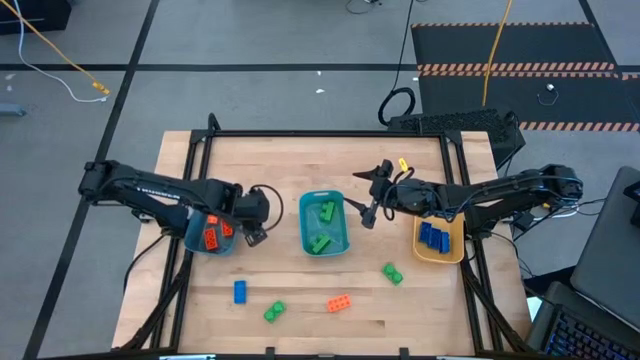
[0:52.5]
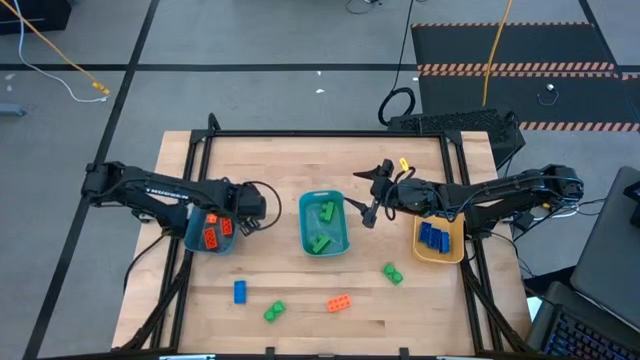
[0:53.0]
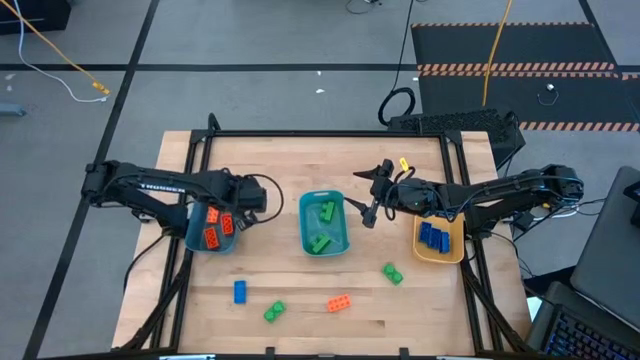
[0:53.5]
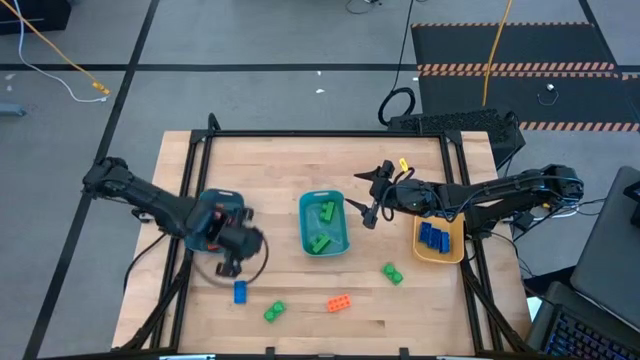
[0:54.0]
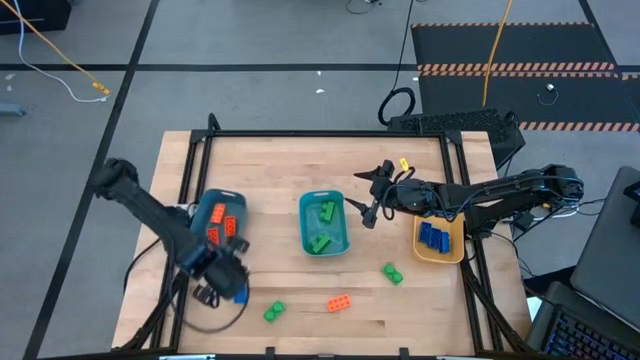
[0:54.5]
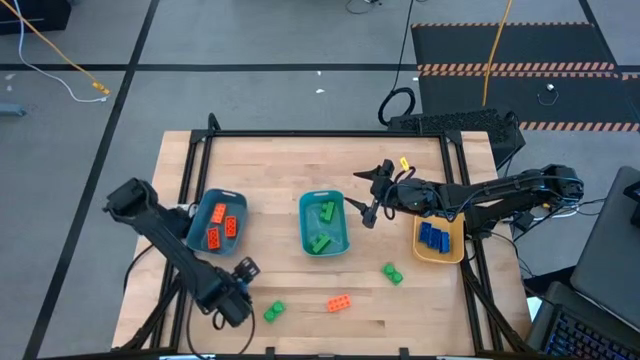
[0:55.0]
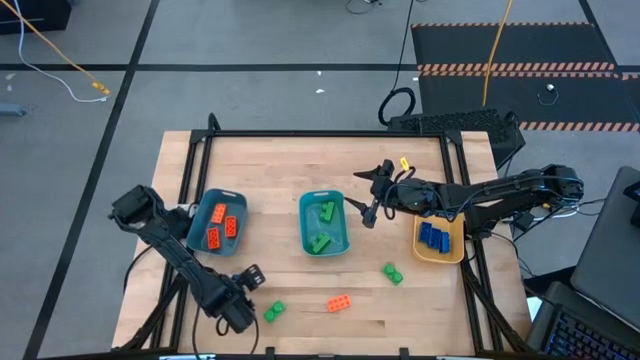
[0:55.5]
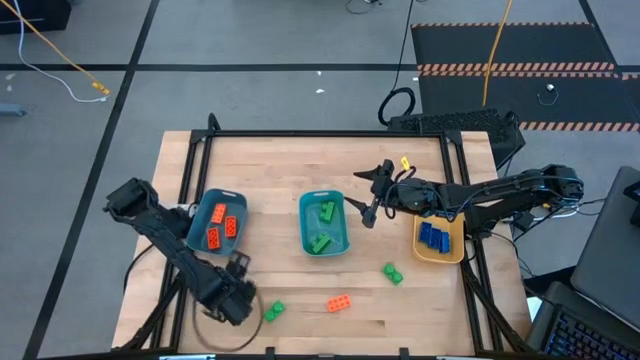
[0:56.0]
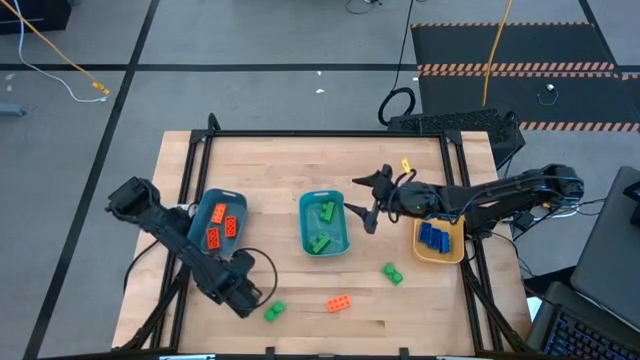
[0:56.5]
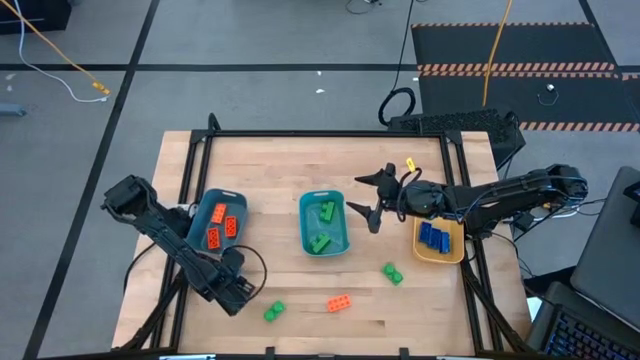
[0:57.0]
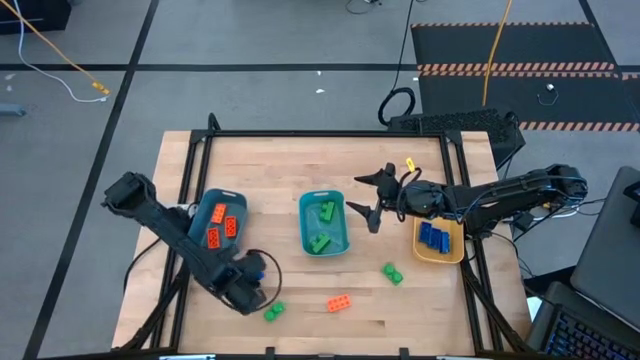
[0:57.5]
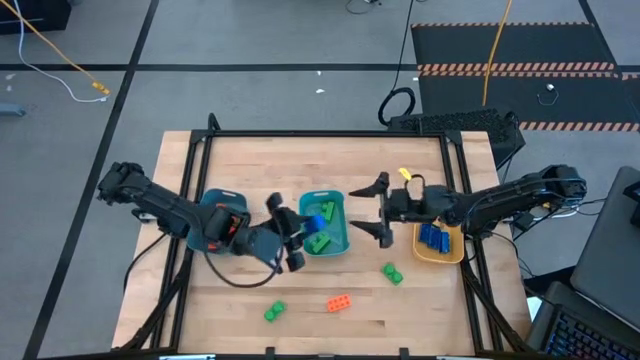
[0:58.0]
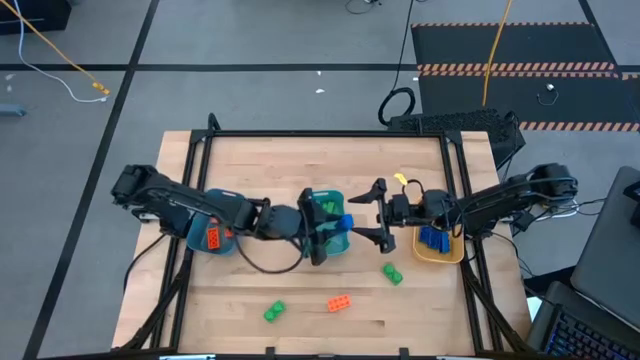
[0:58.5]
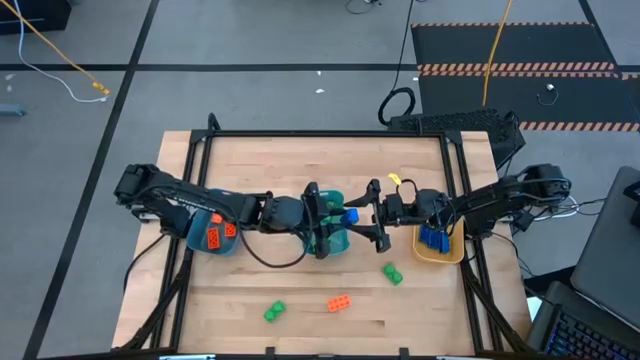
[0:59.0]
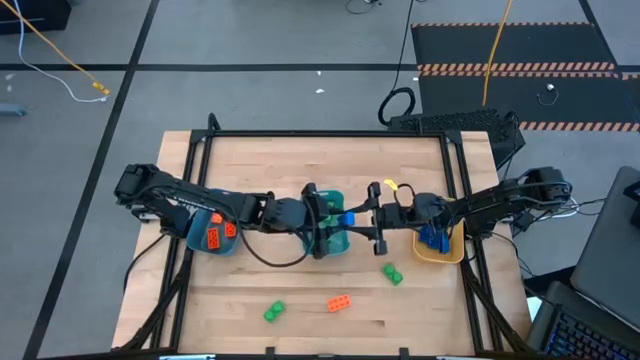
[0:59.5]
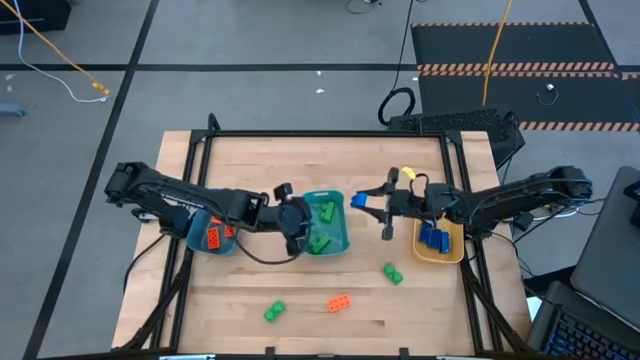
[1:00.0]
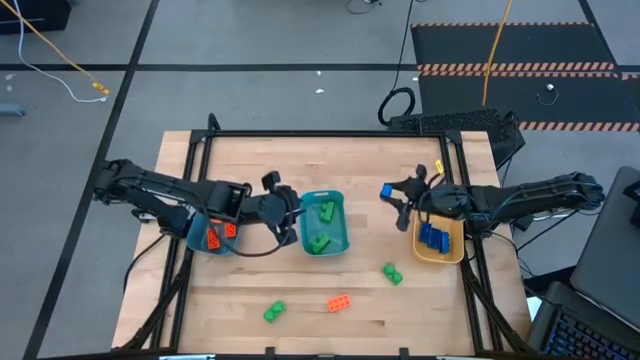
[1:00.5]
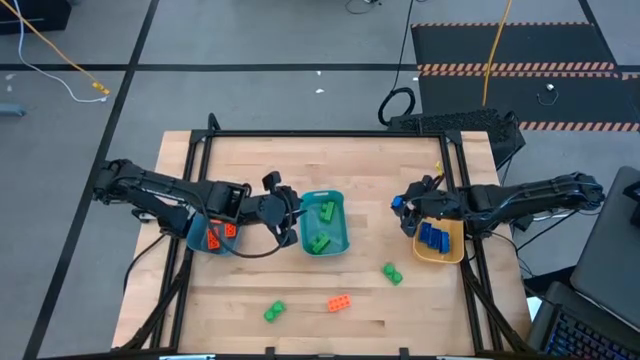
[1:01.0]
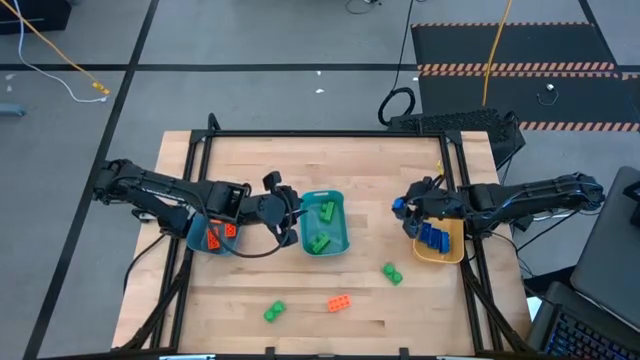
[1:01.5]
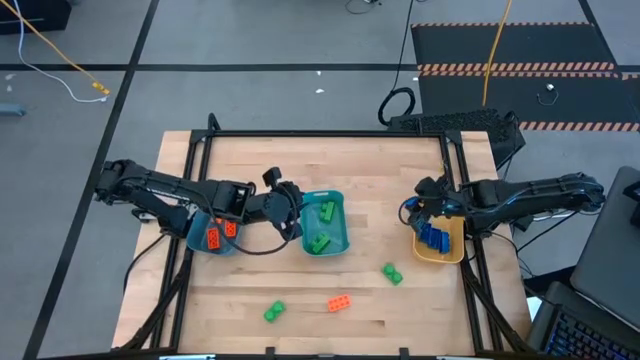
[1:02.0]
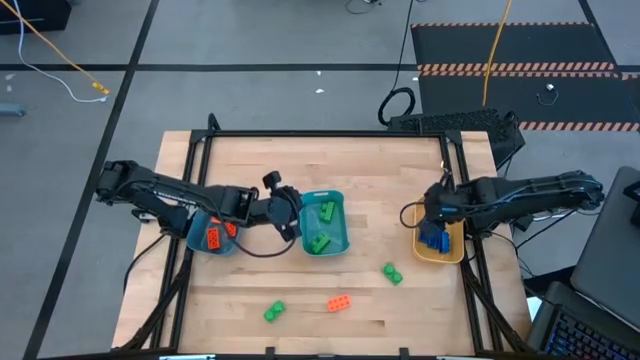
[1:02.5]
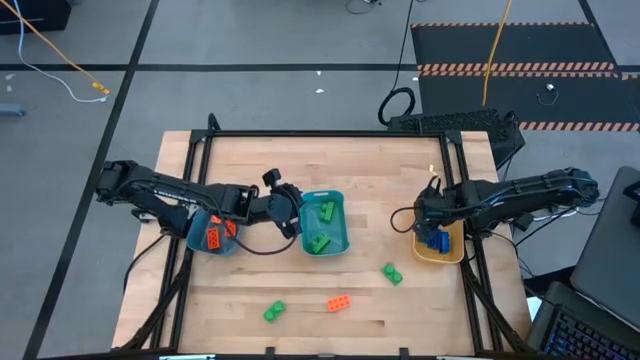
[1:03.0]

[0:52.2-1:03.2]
Task: Sort & place blocks by color
Put the blue game piece into the yellow bin

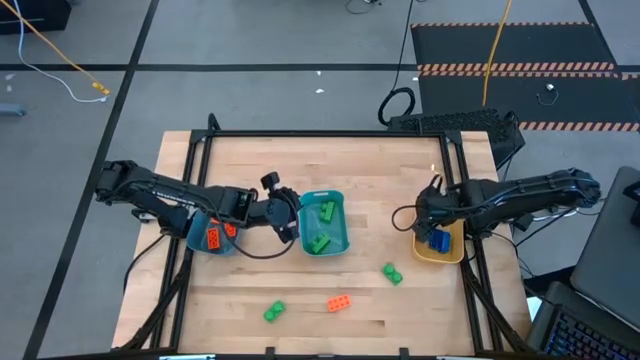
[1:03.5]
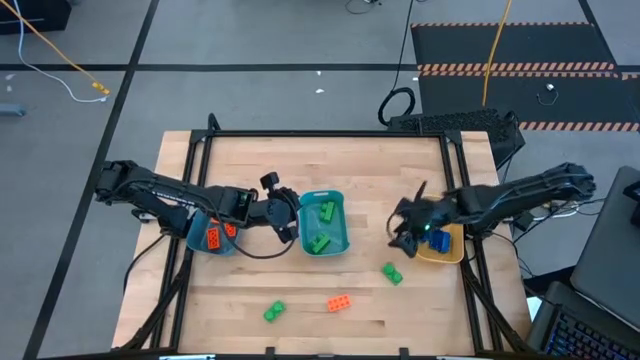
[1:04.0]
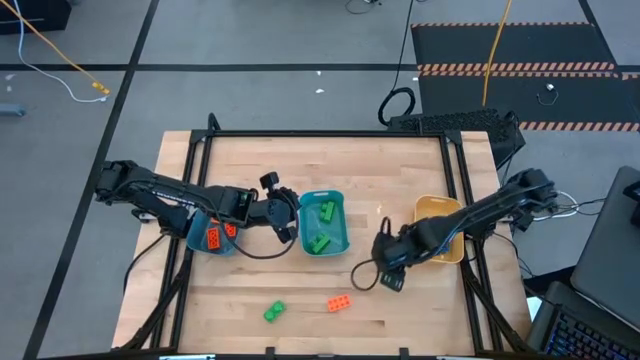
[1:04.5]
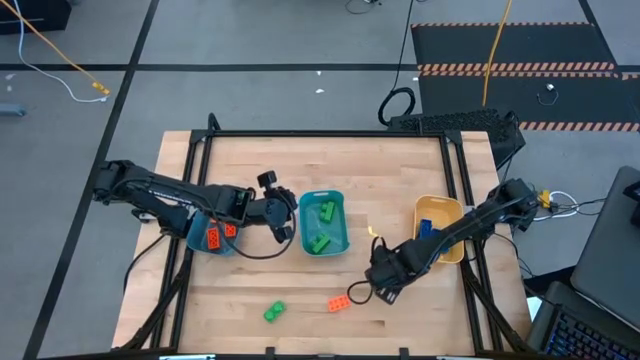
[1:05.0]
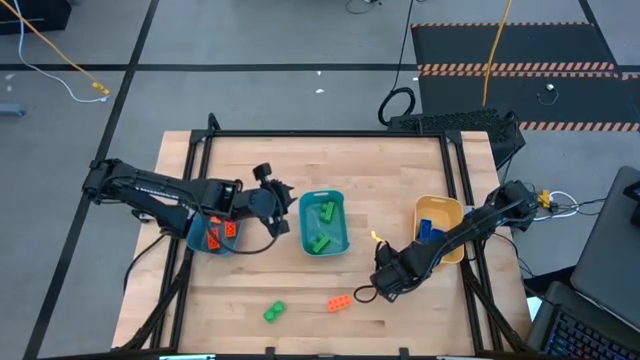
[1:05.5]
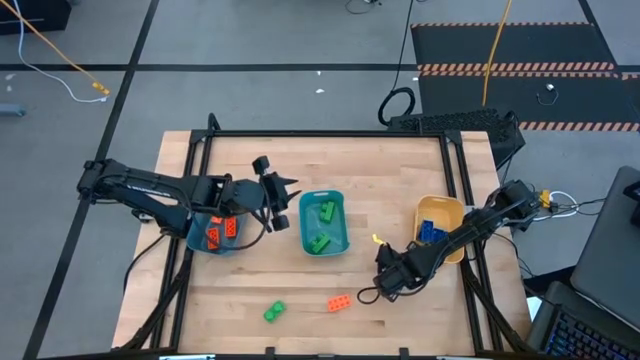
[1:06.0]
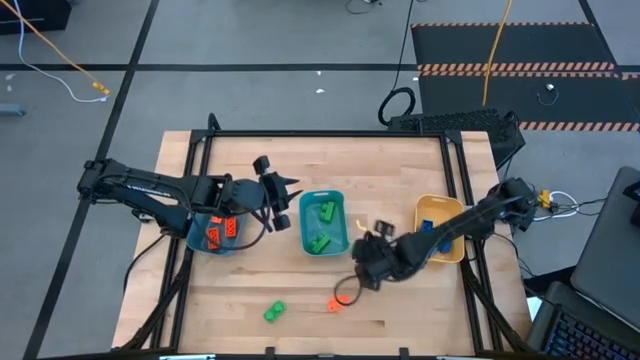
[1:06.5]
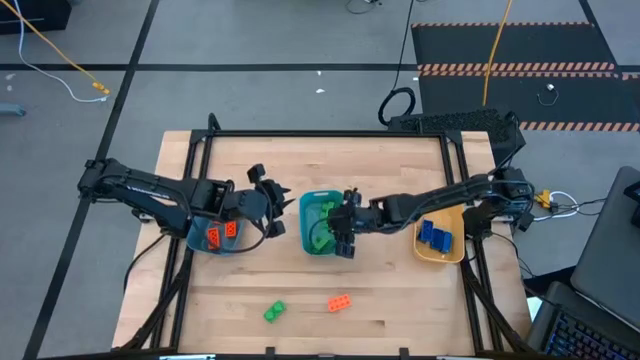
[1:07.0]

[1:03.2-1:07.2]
Put the green game piece into the light blue bin

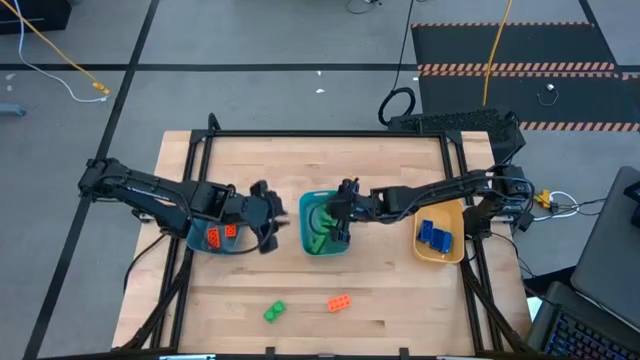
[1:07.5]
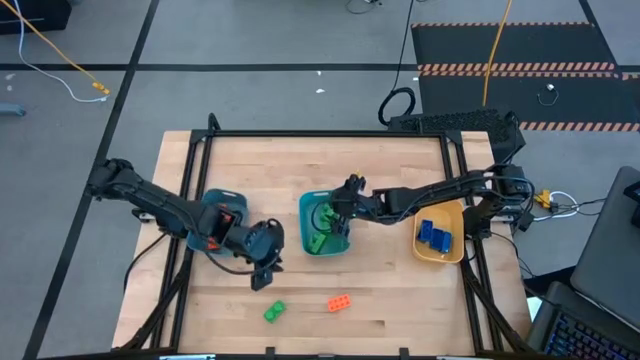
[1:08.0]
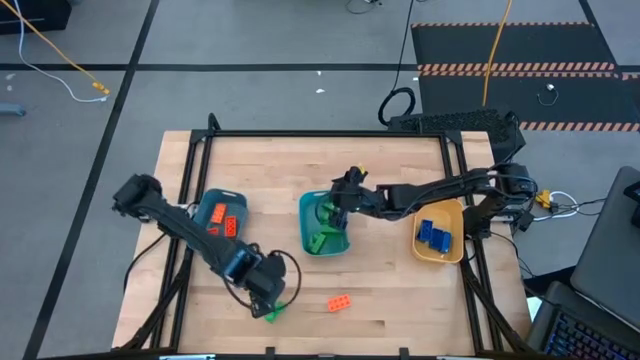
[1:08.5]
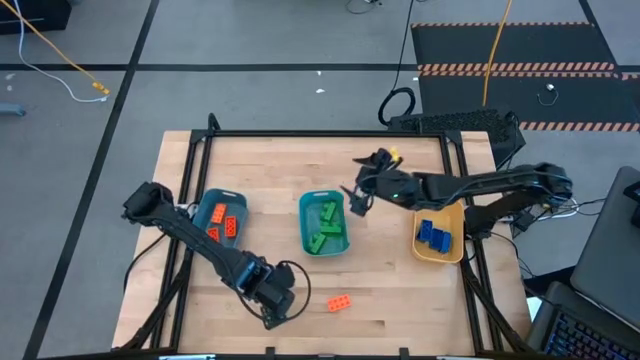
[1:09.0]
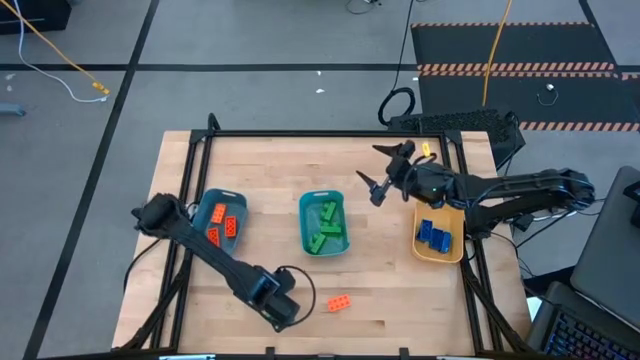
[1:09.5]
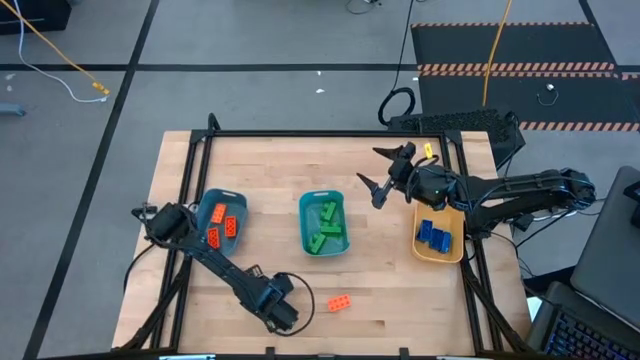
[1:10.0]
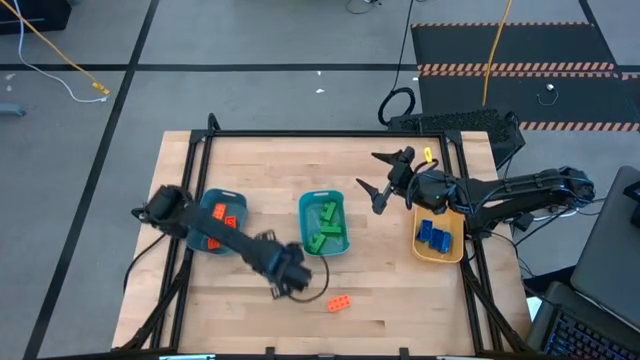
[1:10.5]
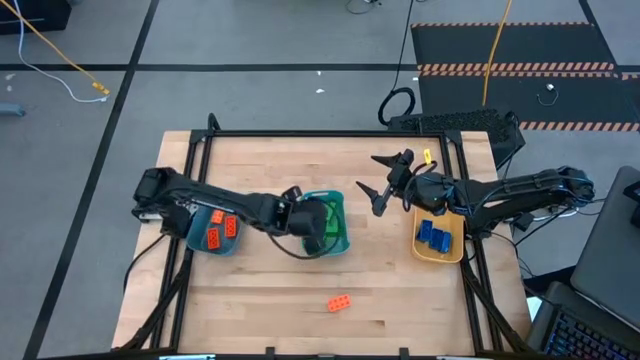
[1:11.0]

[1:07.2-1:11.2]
Put the green game piece into the light blue bin

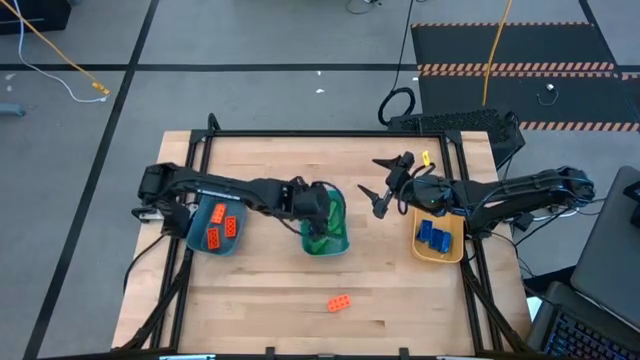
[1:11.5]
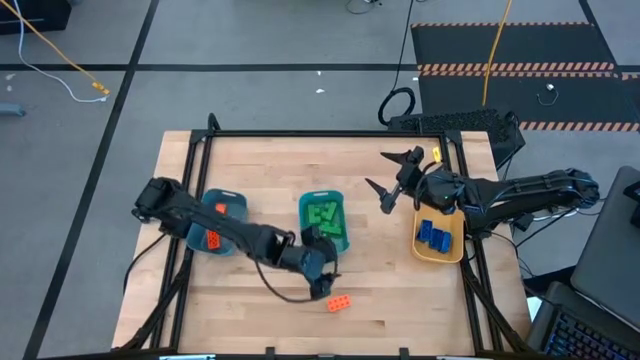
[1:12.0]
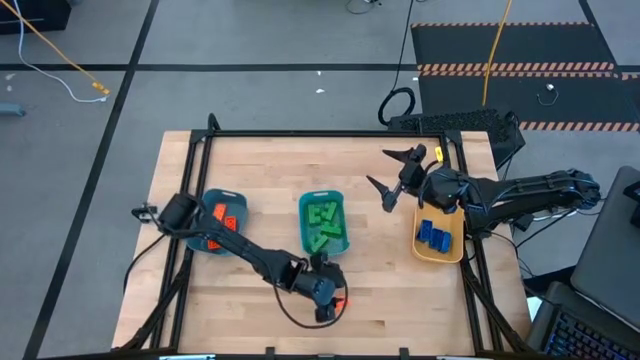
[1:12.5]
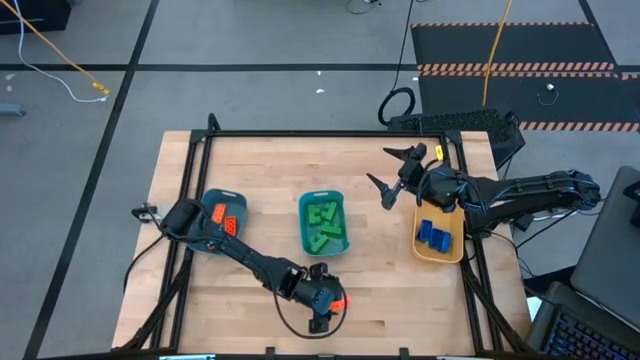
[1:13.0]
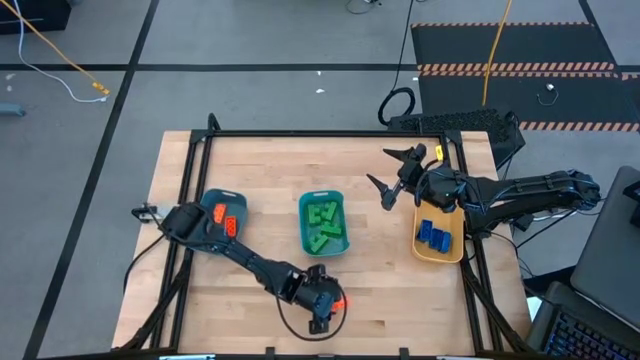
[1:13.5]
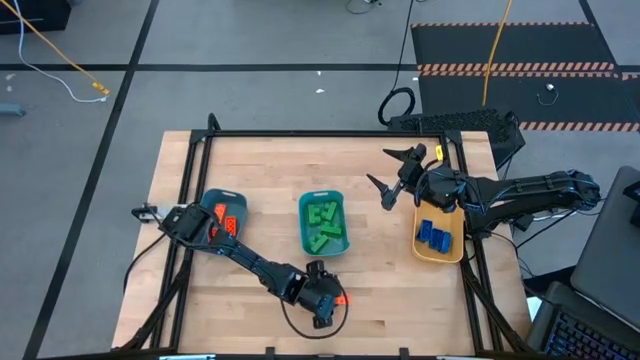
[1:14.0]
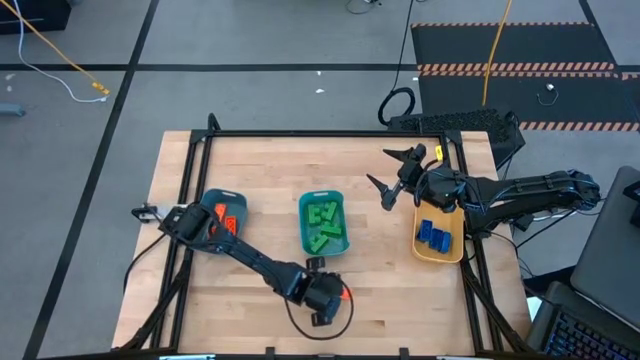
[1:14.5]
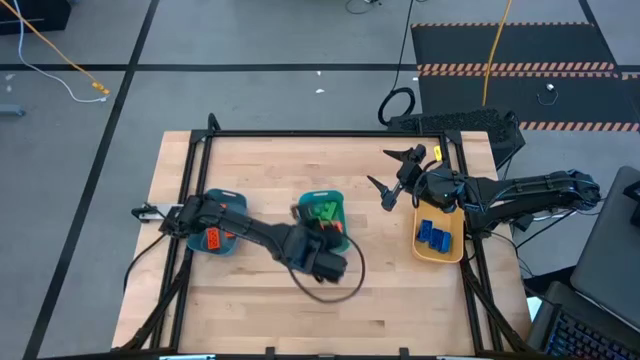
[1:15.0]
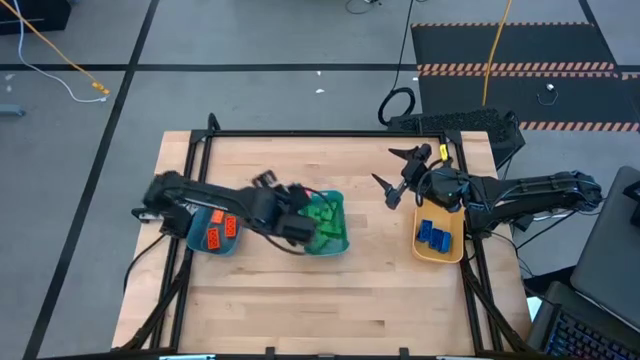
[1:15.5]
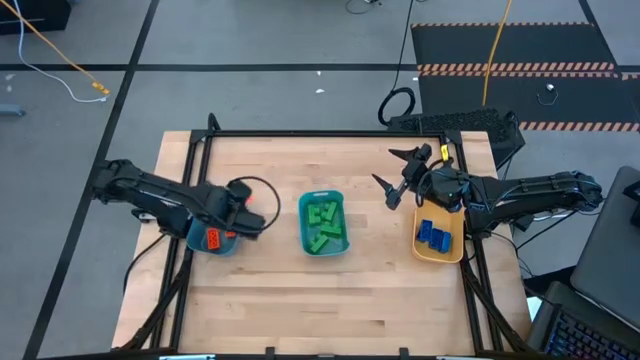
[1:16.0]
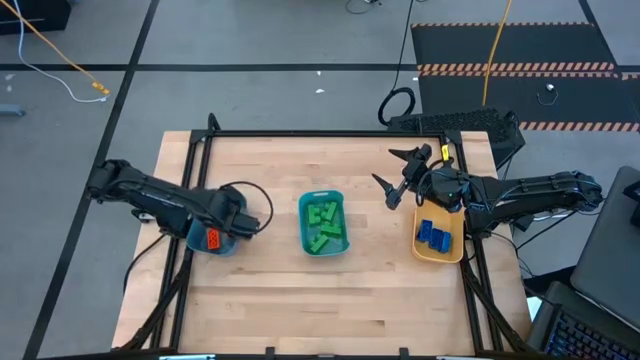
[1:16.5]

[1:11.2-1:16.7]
Put the orange game piece into the dark blue bin
